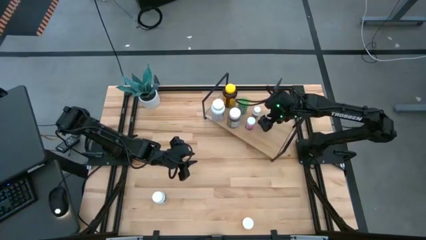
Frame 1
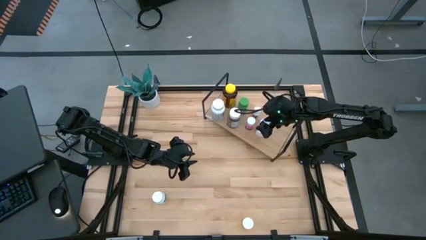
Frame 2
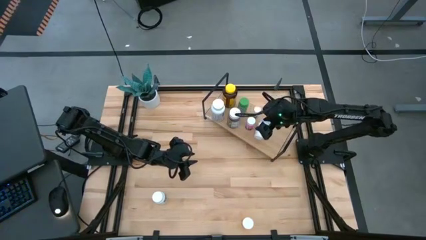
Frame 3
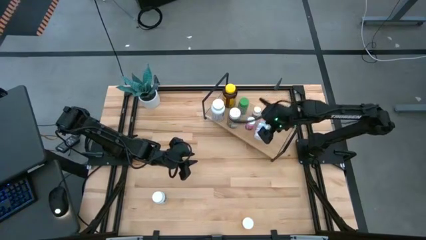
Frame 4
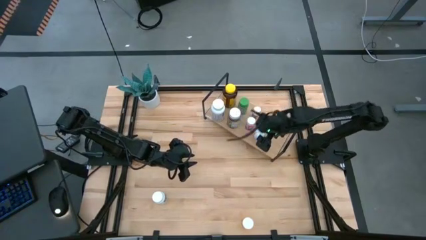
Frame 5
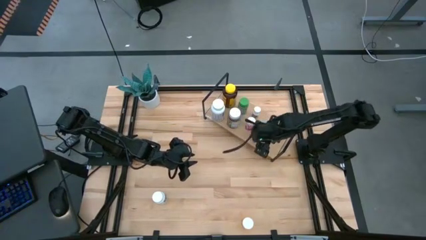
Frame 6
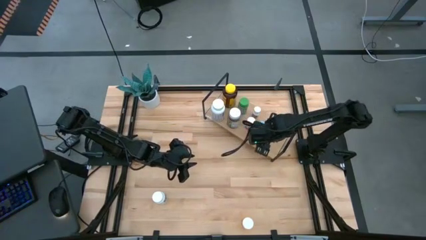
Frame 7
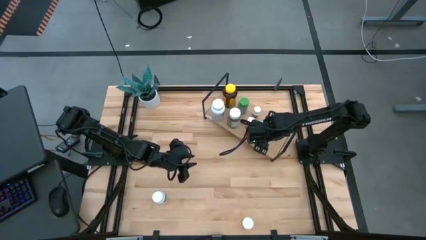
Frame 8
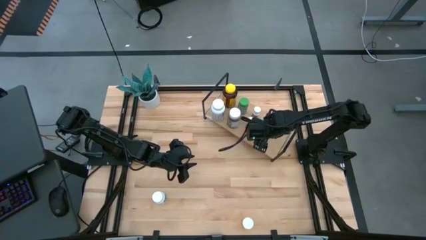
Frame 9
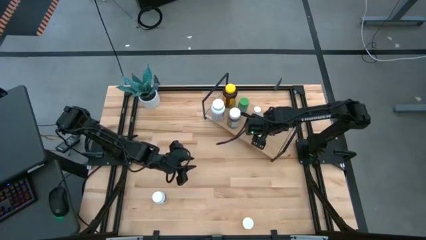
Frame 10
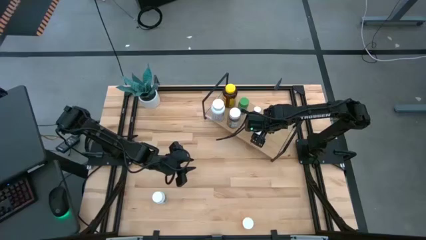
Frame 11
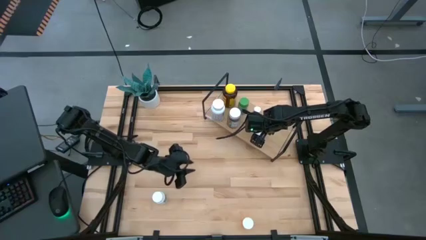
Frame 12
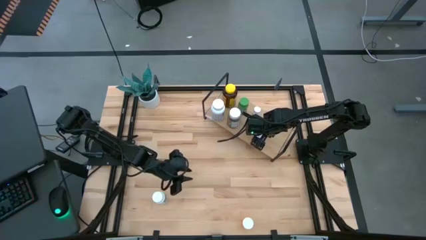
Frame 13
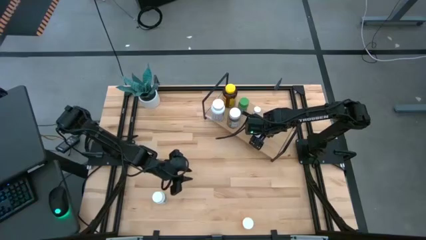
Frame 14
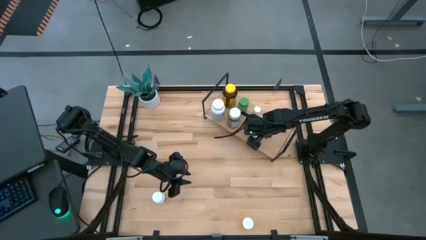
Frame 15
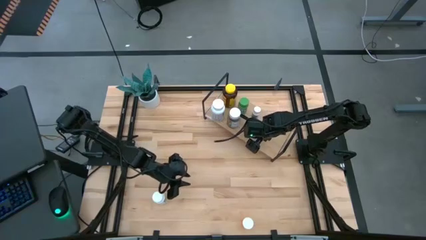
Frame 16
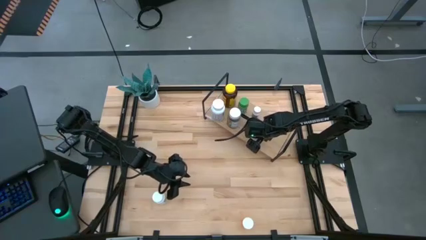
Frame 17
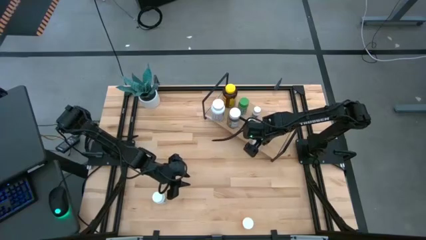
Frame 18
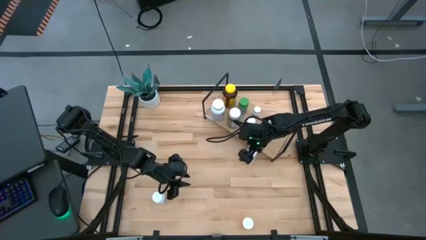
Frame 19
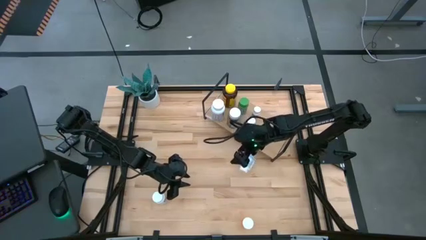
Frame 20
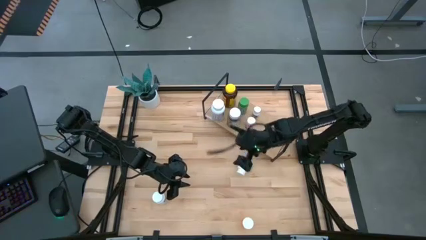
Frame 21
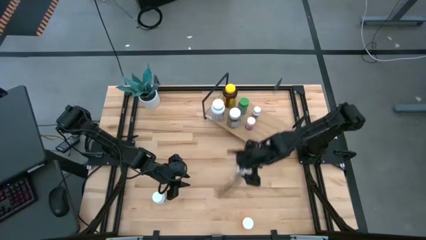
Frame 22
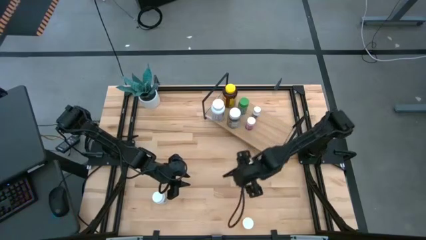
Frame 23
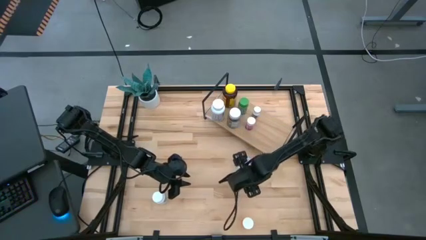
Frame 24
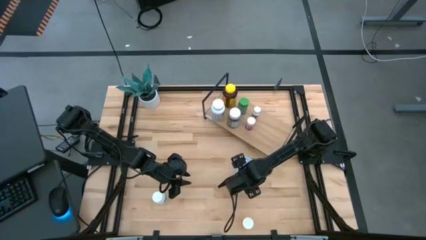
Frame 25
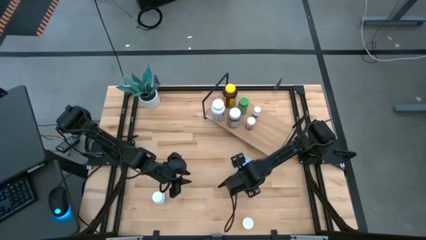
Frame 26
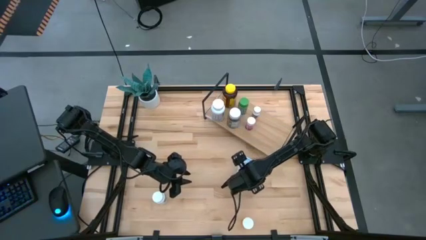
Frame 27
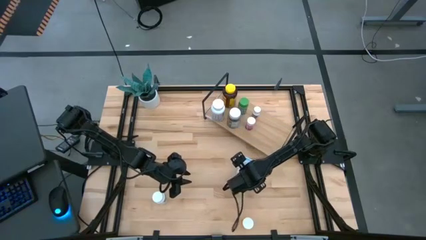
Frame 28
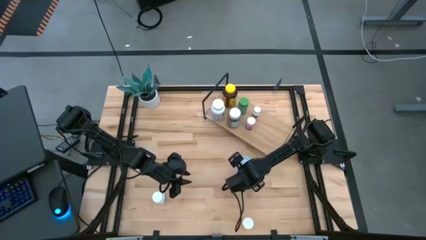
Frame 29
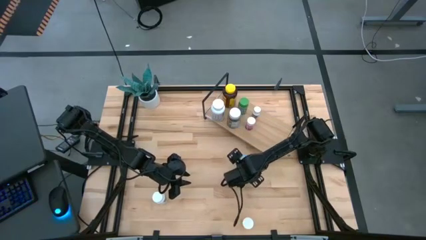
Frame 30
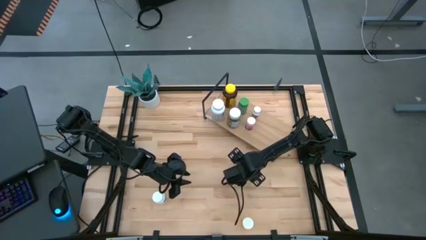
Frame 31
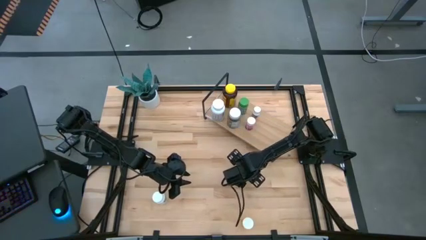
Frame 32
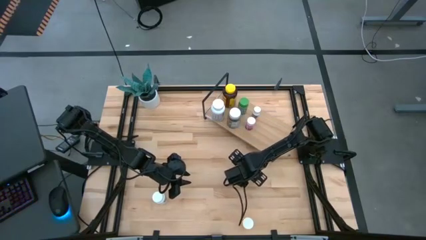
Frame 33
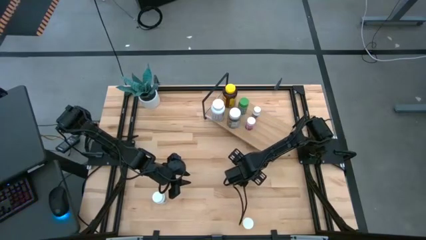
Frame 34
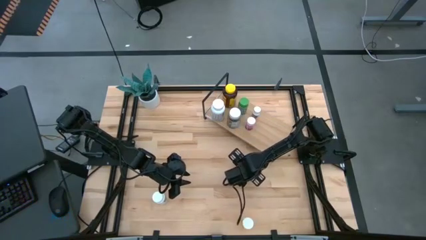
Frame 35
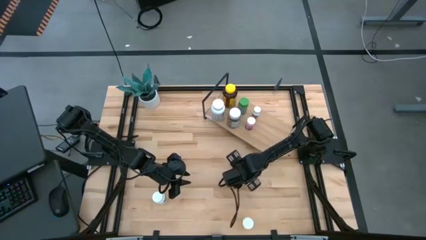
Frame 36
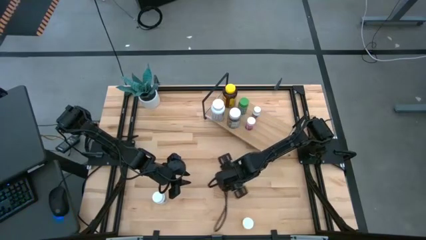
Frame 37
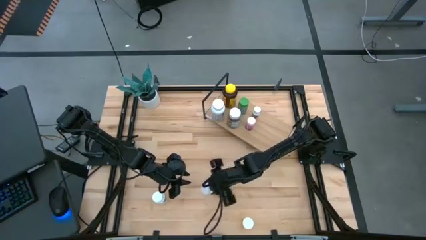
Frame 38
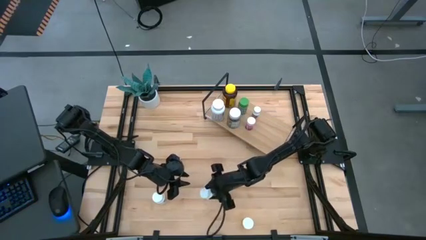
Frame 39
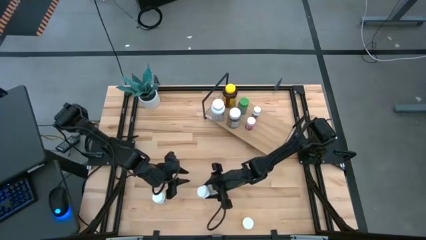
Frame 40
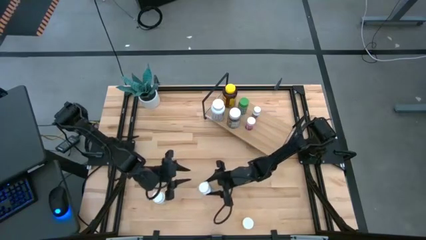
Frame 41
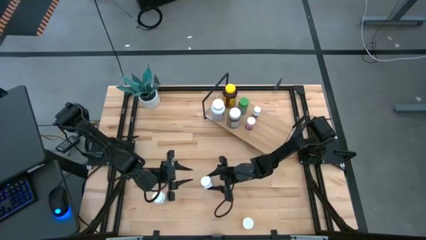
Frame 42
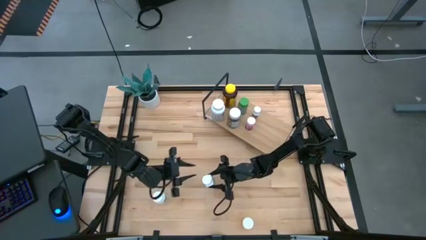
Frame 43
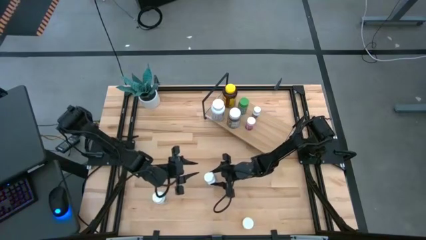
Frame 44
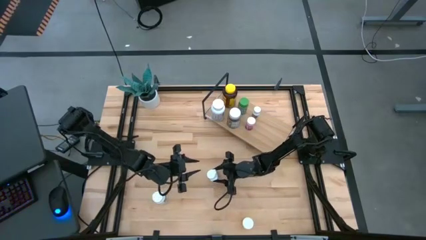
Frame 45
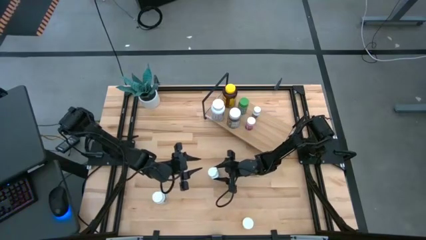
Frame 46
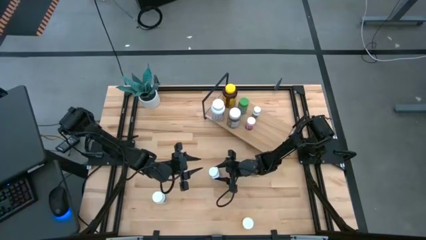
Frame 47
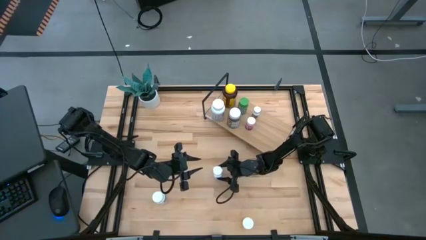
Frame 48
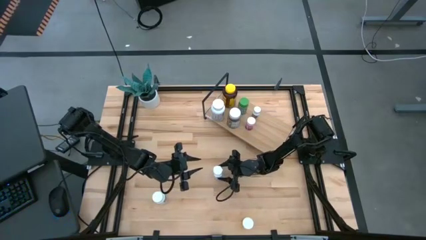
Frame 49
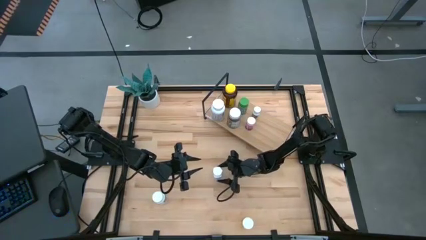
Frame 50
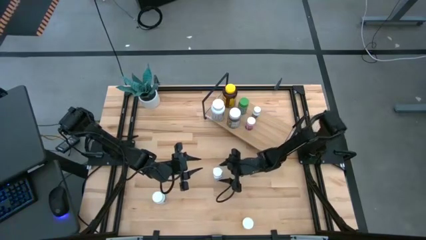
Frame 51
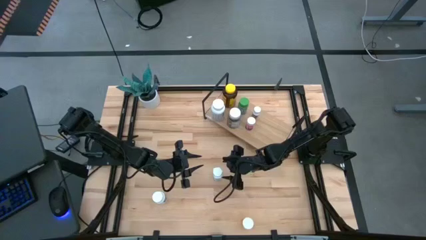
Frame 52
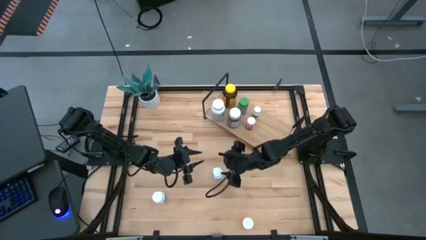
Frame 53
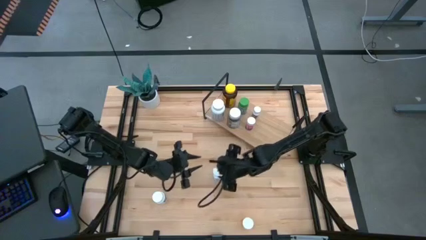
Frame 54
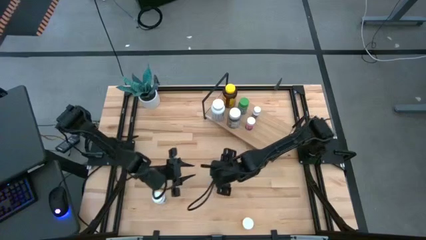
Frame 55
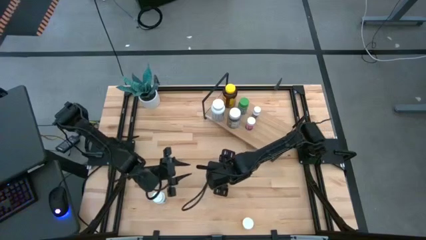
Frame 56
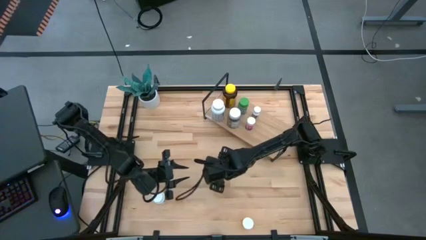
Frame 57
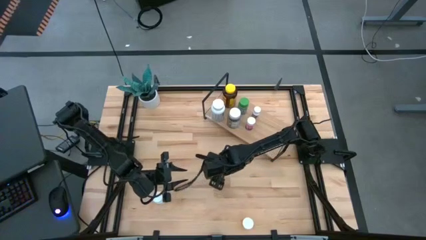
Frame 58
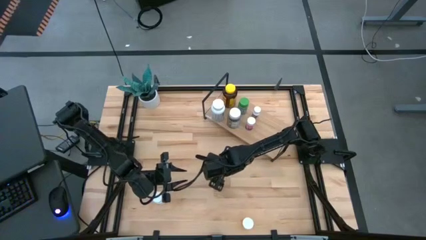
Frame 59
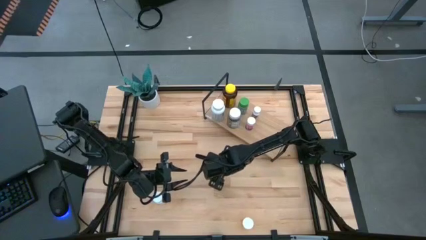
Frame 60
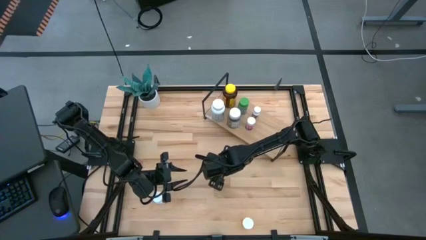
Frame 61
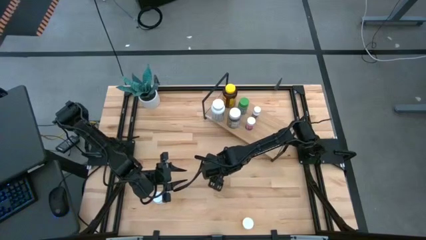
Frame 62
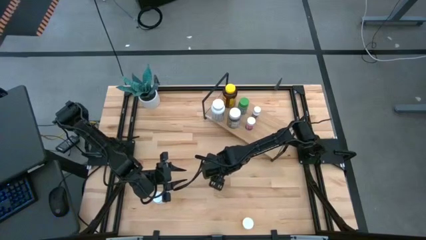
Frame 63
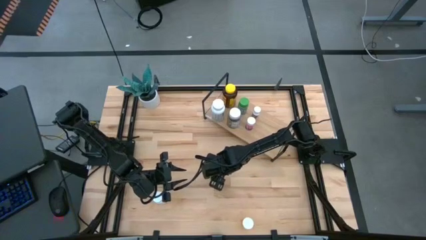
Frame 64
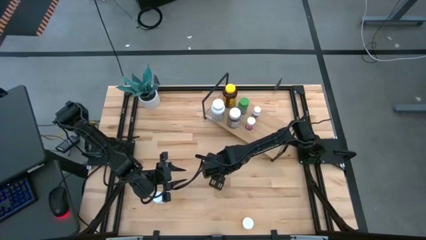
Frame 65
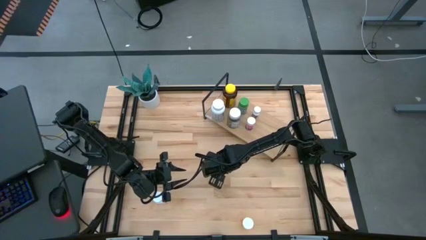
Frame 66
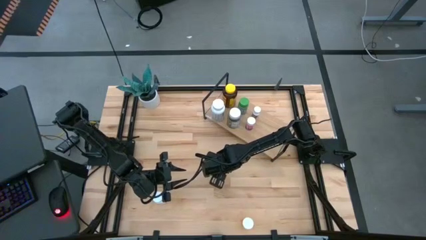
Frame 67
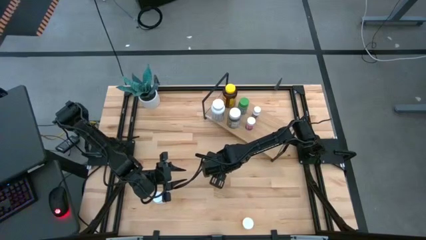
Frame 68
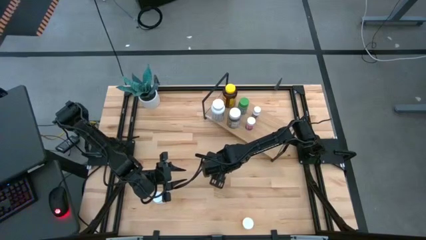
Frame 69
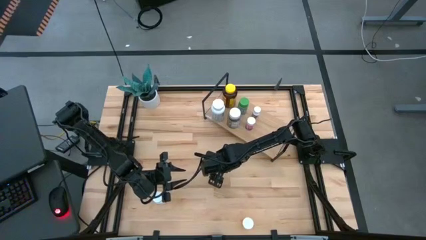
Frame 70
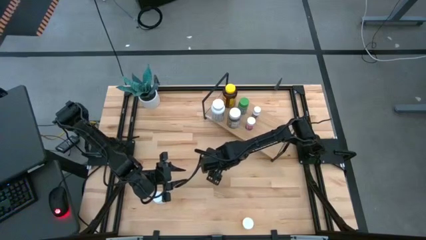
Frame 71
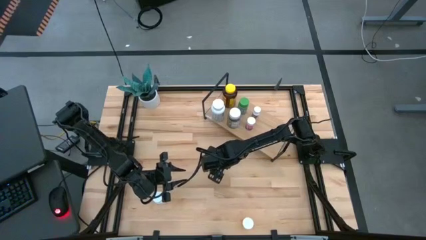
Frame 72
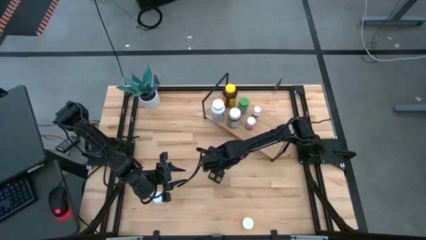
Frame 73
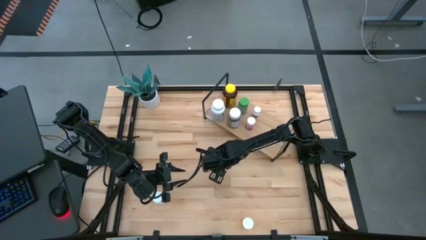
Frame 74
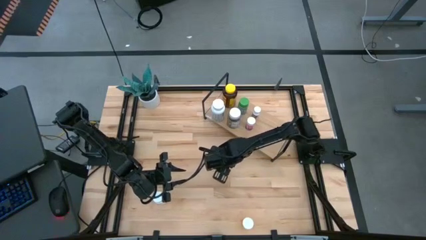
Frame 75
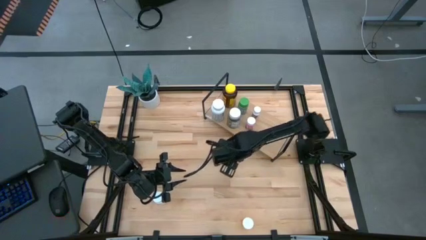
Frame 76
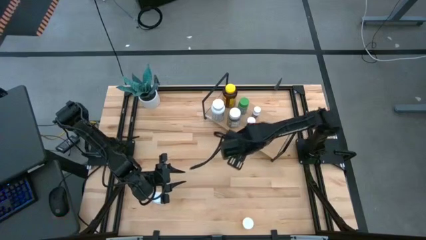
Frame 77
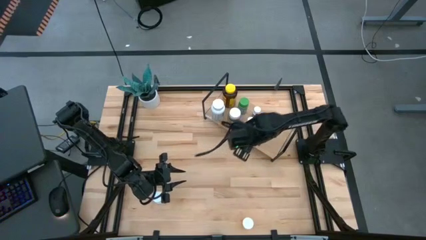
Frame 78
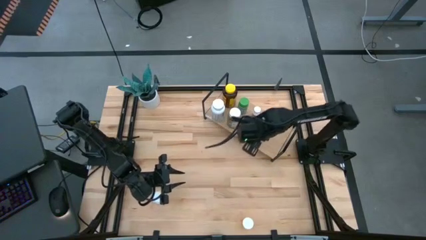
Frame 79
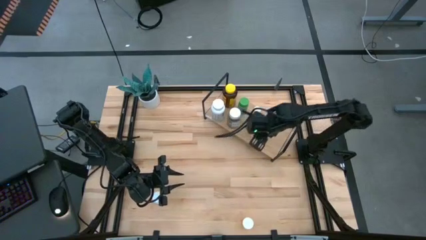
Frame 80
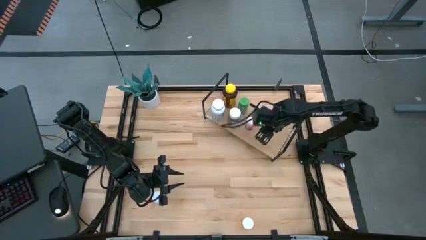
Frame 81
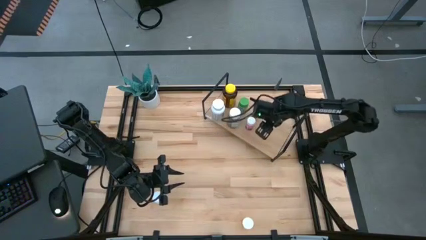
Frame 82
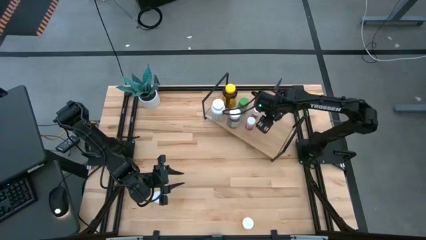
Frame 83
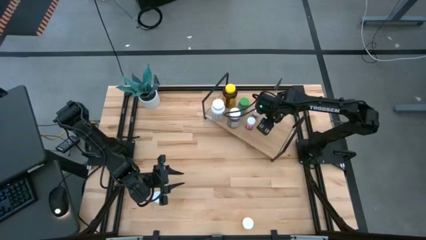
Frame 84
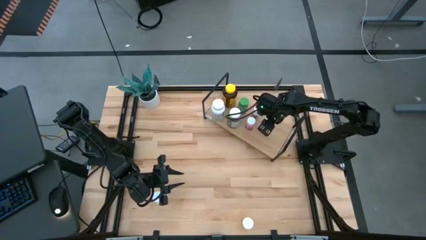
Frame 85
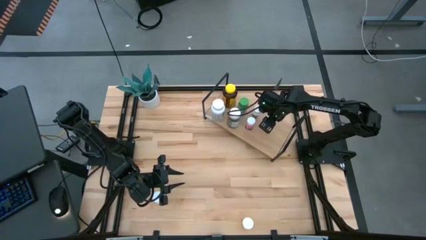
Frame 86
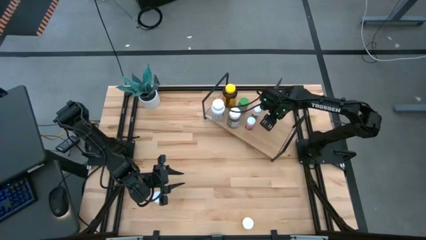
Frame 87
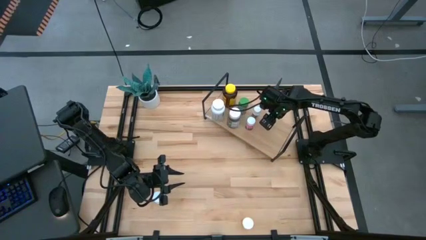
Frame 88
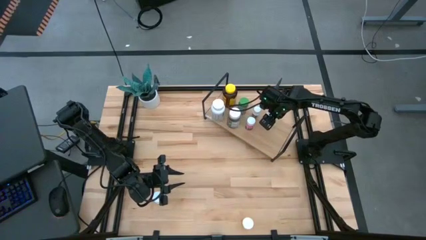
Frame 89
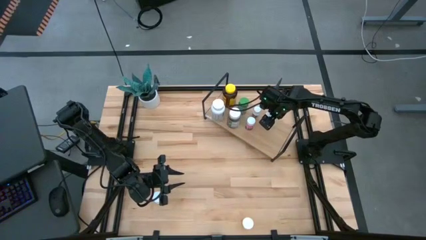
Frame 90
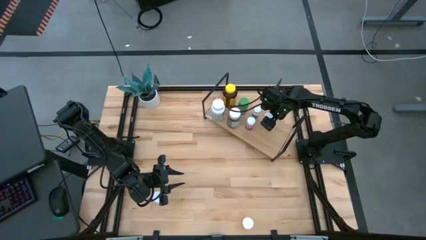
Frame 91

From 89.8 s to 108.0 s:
Task: Pick and place medicine bottles onto shelf by color
Put the white and blue pill bottle on the shelf
